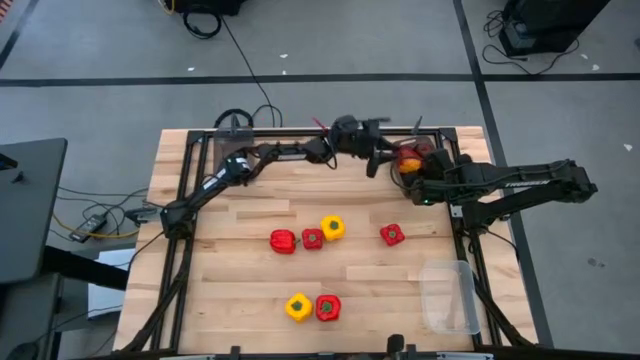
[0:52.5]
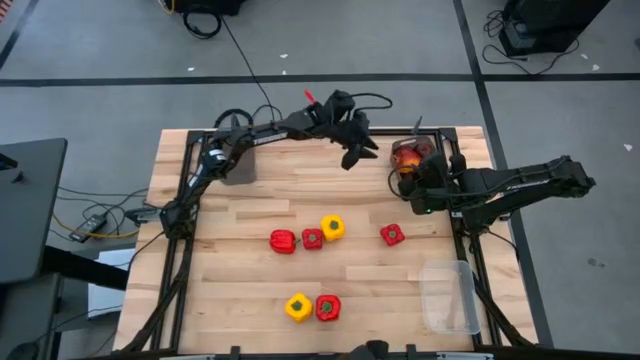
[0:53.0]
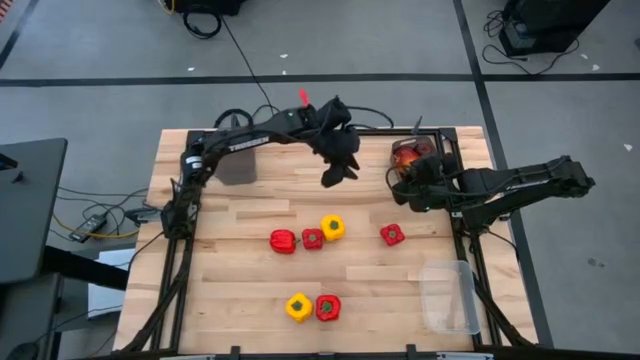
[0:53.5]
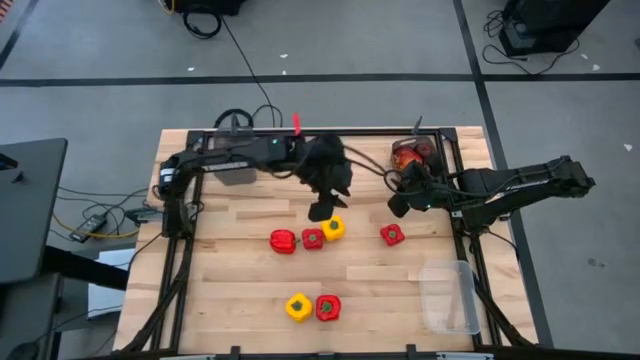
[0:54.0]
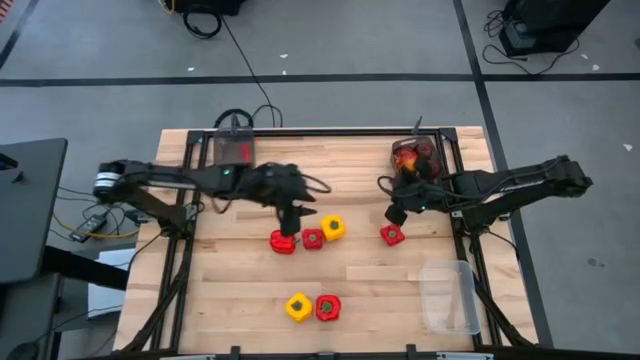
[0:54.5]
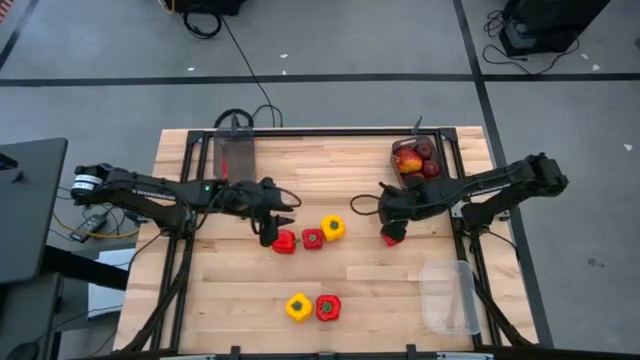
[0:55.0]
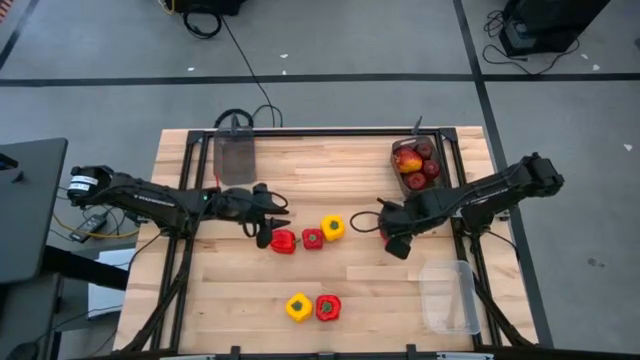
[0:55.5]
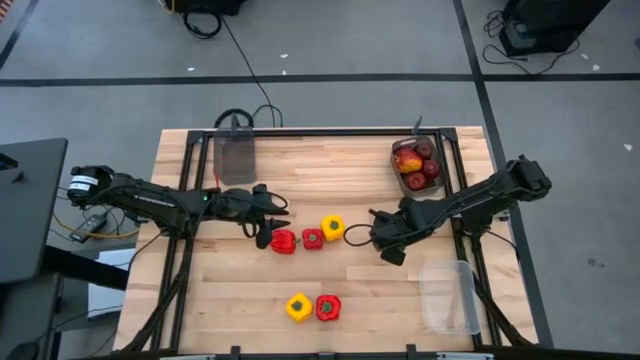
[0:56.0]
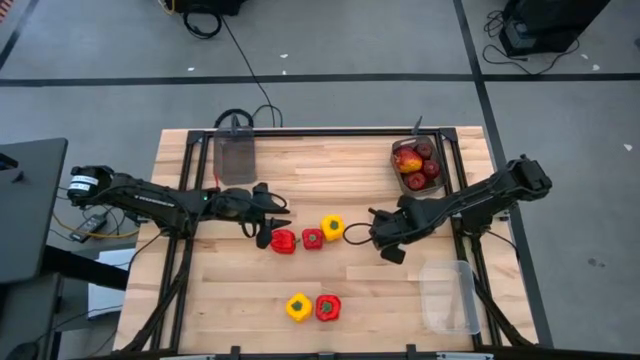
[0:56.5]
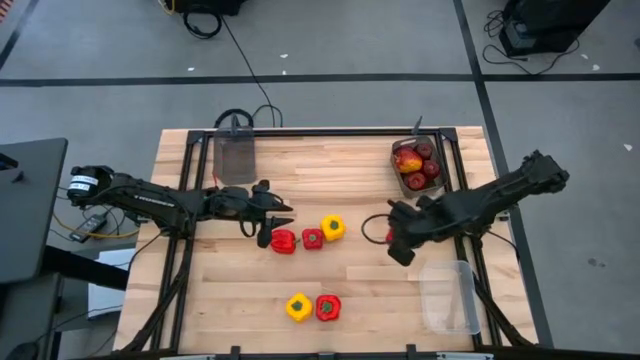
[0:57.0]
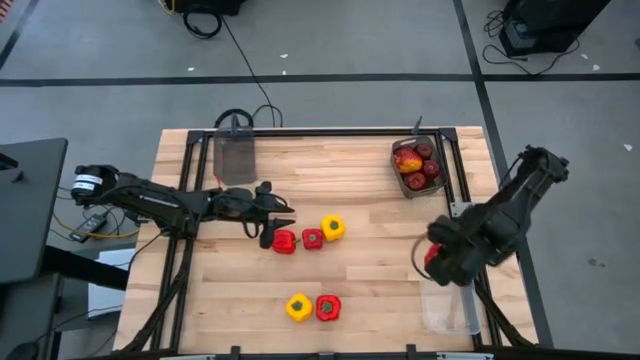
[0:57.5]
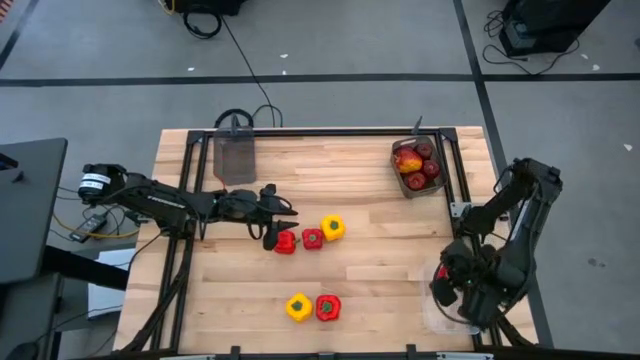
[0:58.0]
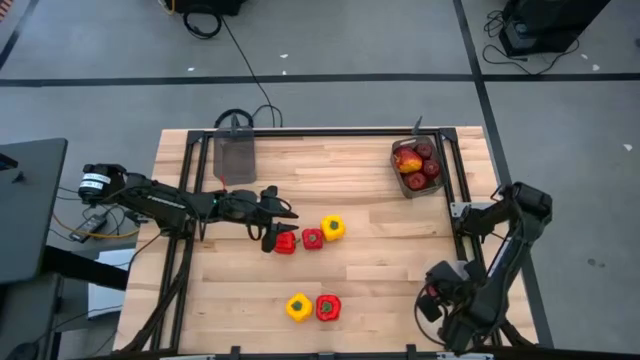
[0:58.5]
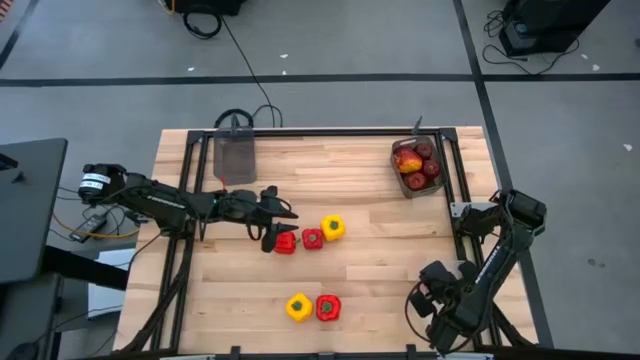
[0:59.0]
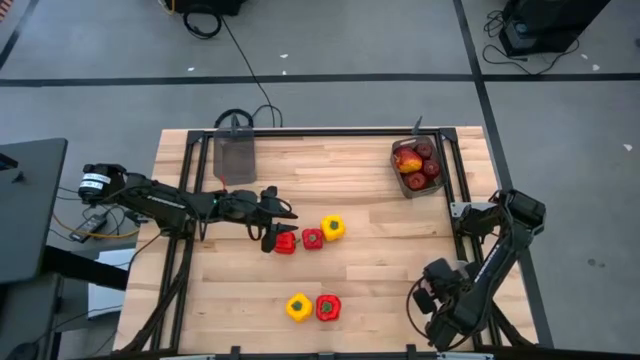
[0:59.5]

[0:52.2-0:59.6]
Task: Sort produce into baskets
Put the top right red bell pepper into the transparent bin

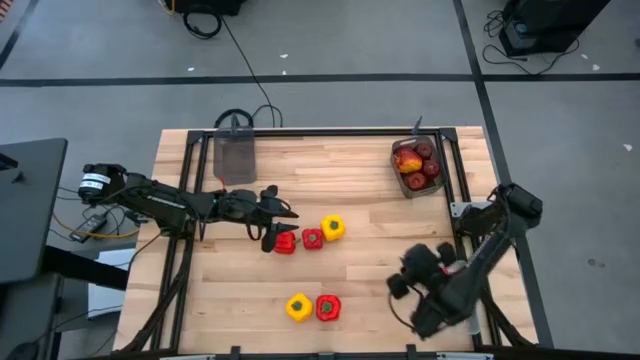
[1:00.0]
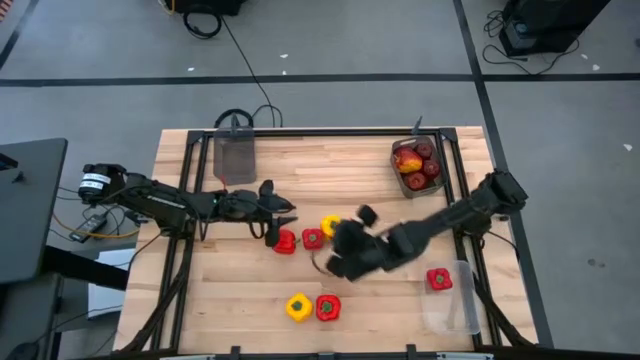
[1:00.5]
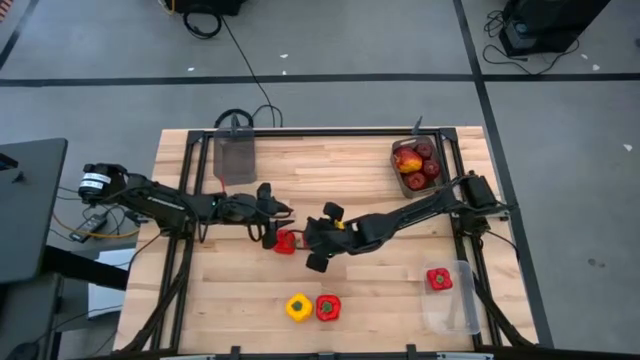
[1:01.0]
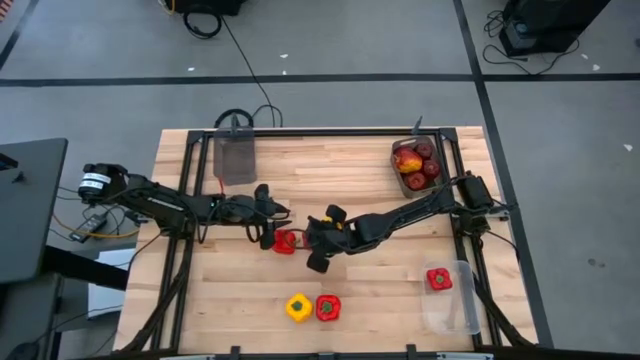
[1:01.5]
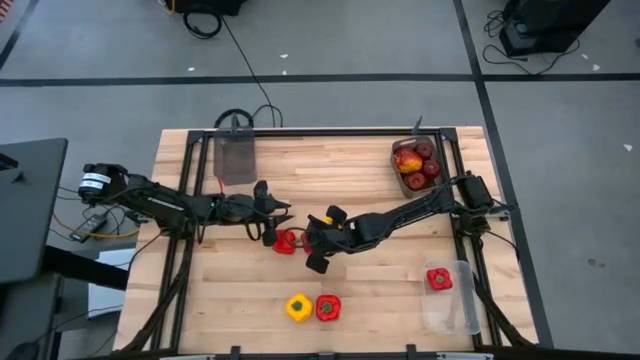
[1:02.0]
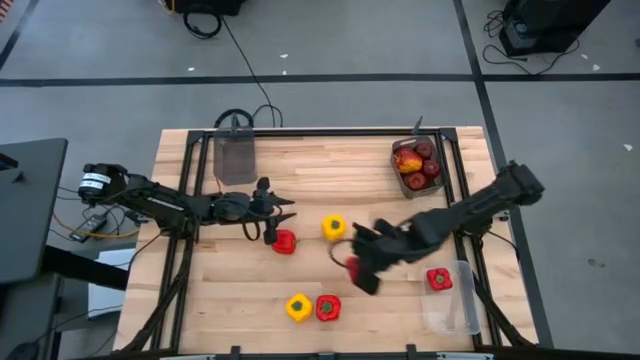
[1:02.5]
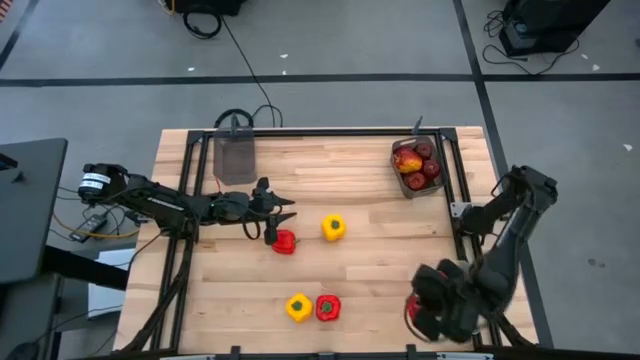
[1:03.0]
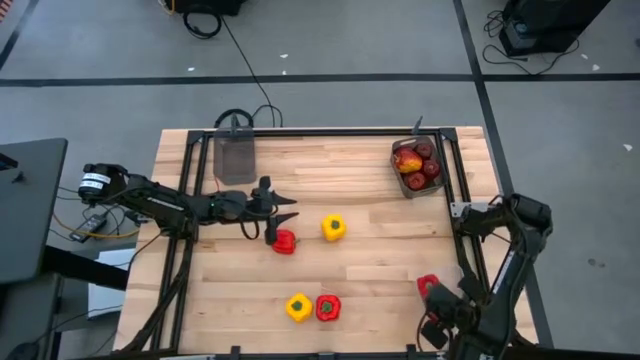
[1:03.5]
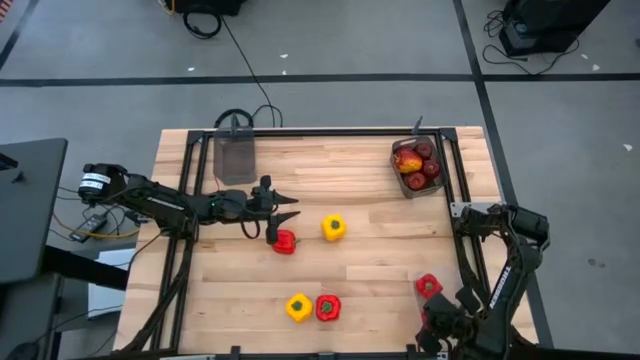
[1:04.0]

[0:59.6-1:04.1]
Put the top right red bell pepper into the transparent bin

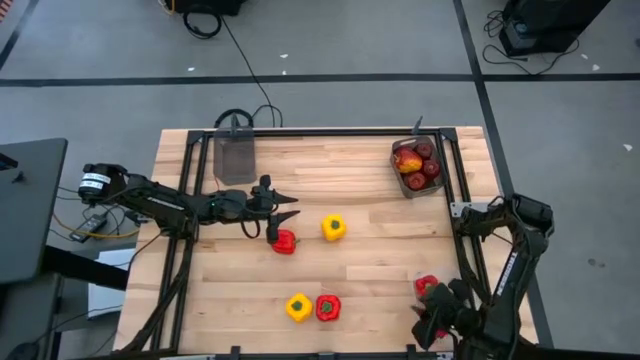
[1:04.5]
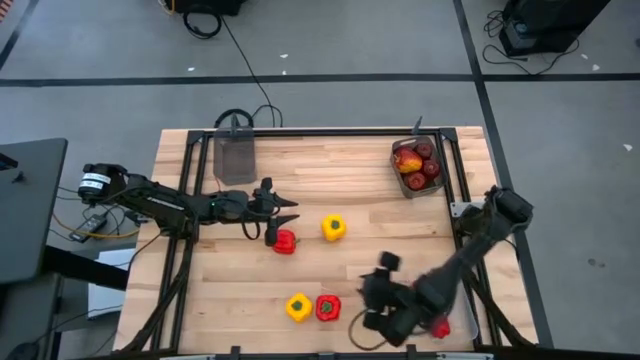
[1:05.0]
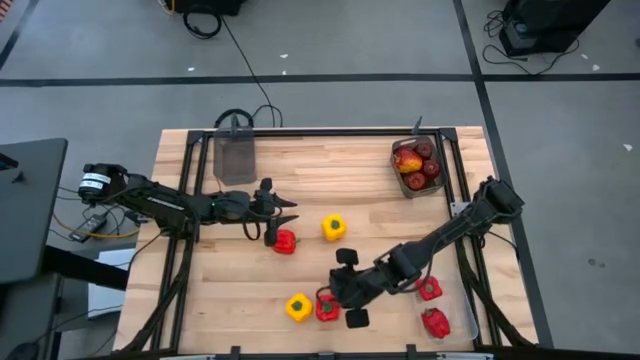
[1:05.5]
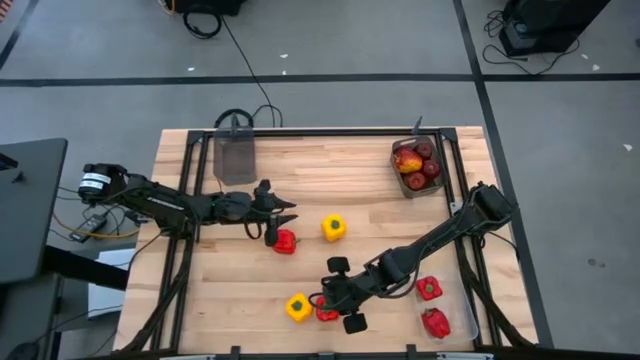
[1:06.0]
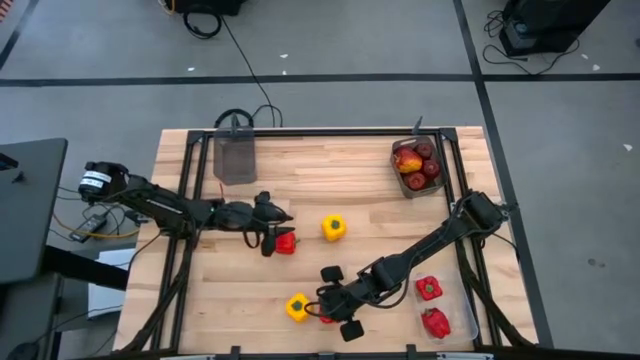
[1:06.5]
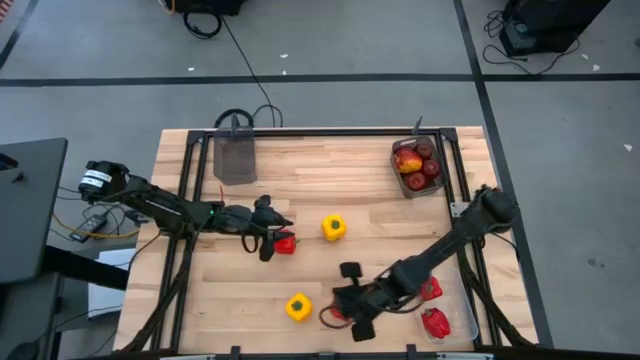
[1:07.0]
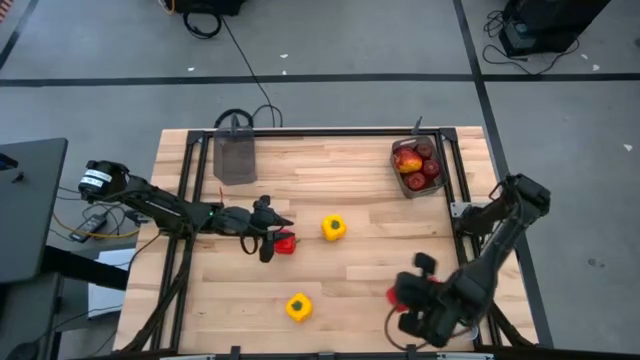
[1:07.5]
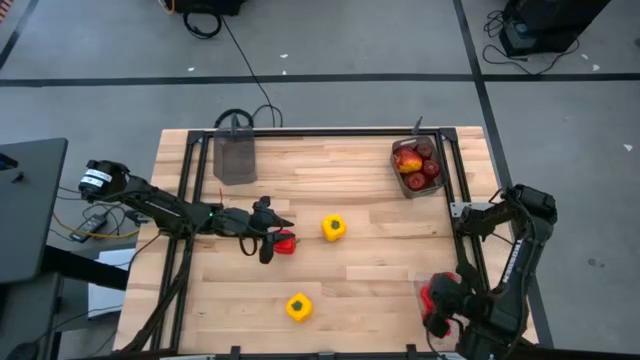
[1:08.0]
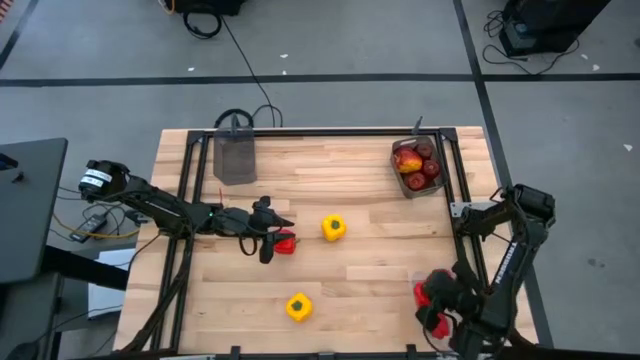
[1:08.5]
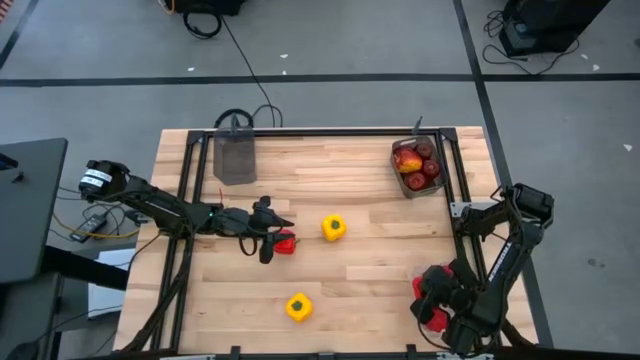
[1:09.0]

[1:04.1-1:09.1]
Put the bottom red bell pepper into the transparent bin

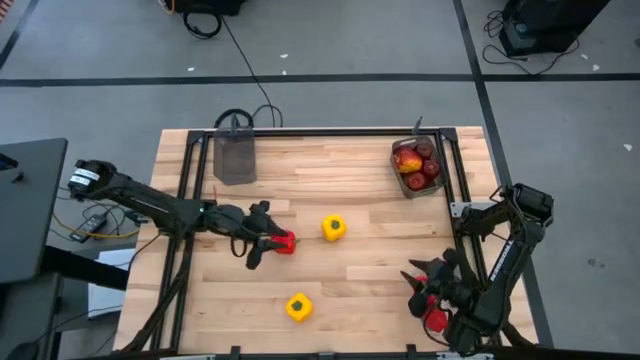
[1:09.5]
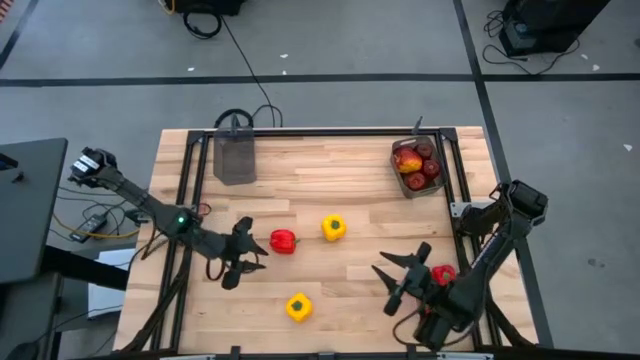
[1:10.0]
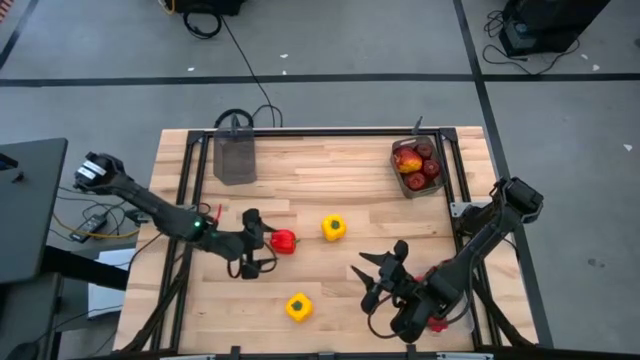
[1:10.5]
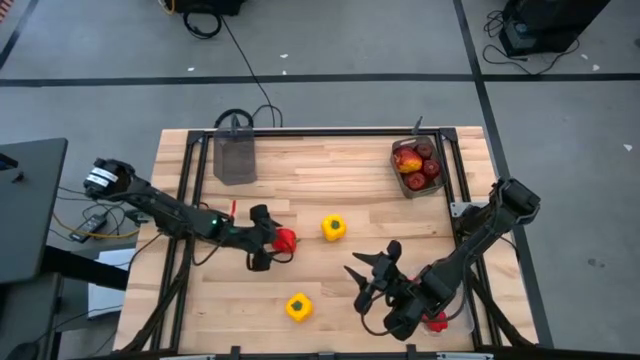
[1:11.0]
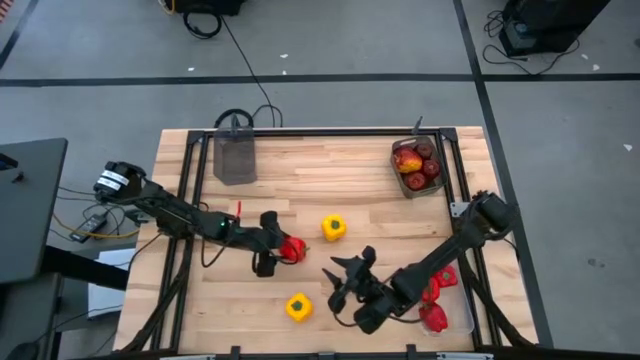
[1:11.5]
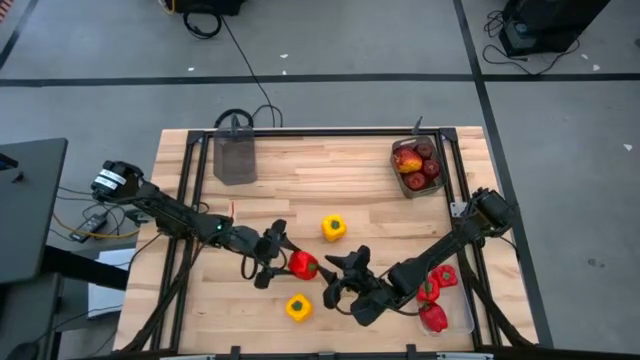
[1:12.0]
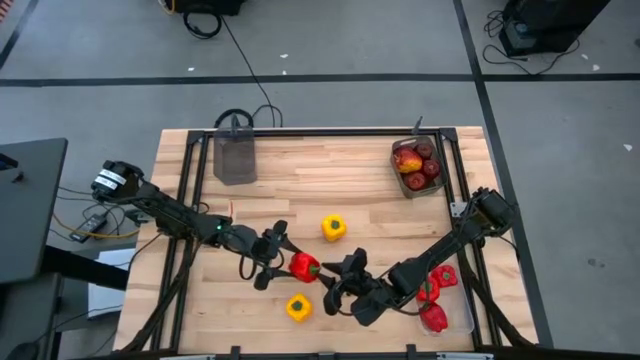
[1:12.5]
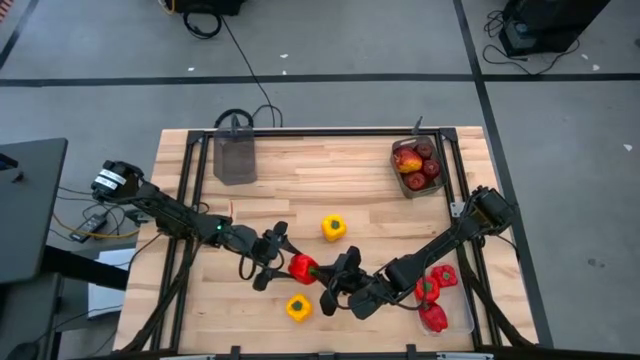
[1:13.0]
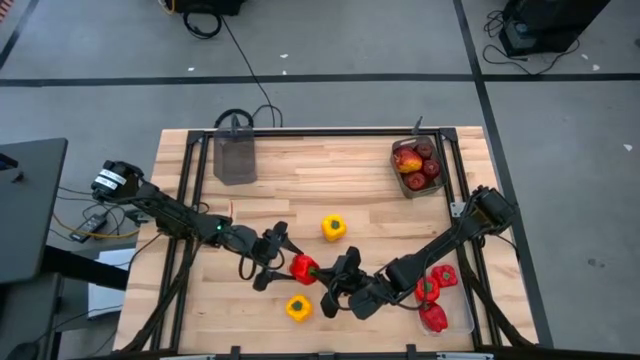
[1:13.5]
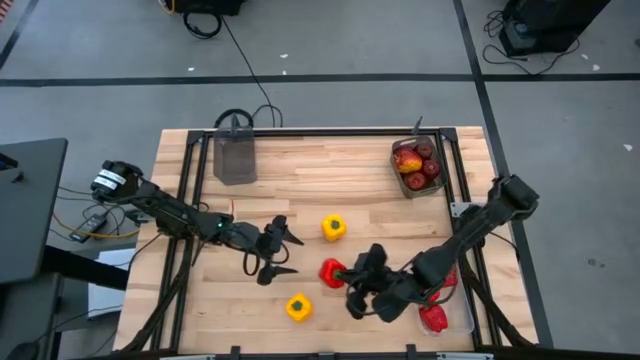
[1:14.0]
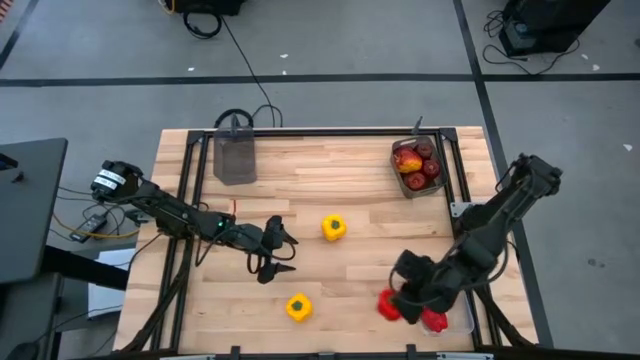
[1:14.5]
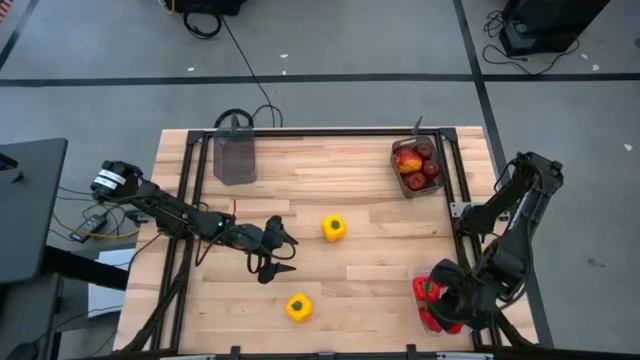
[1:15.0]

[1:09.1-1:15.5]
Put the red bell pepper into the transparent bin
